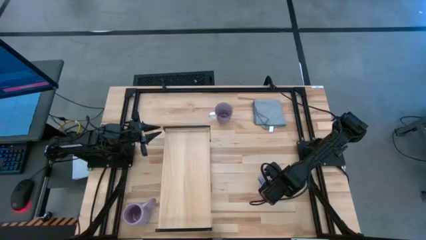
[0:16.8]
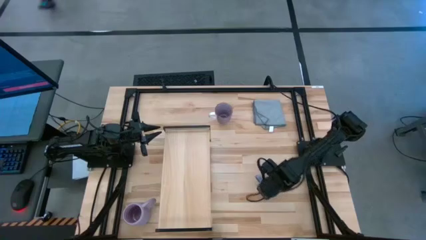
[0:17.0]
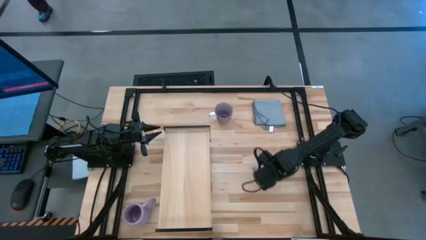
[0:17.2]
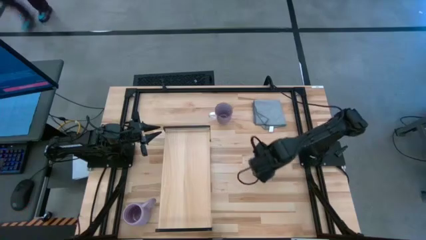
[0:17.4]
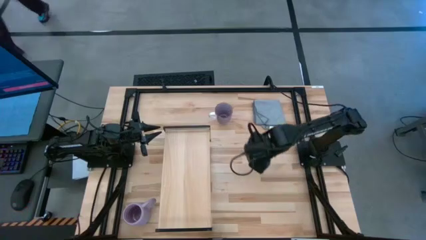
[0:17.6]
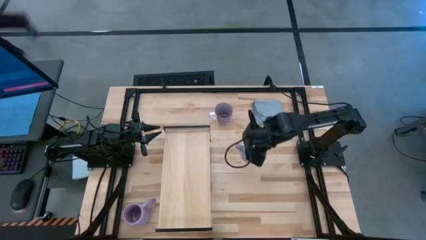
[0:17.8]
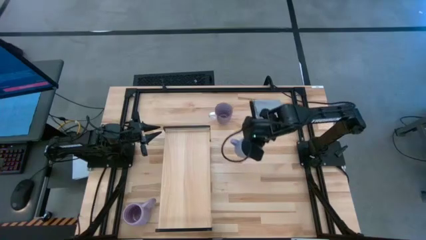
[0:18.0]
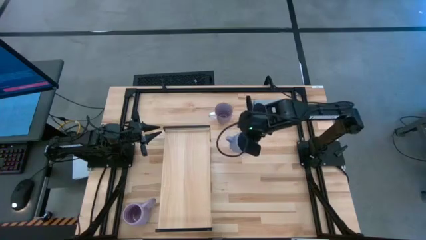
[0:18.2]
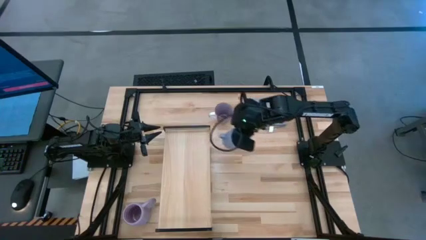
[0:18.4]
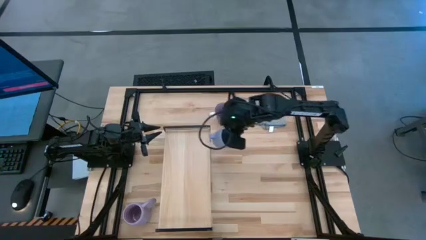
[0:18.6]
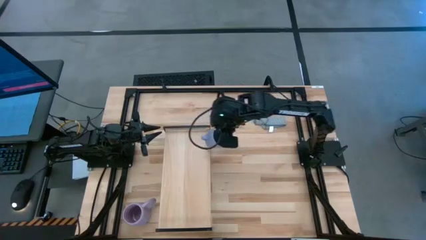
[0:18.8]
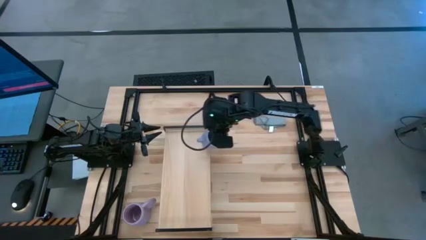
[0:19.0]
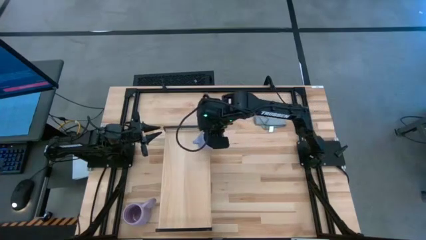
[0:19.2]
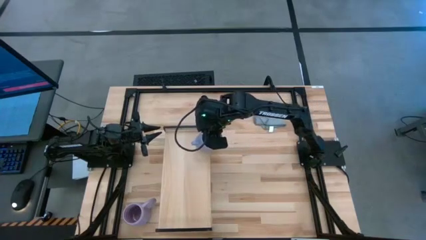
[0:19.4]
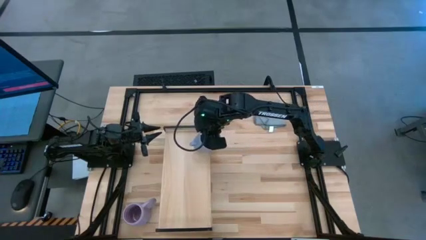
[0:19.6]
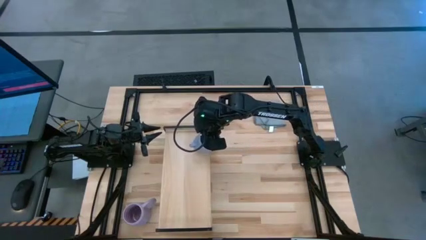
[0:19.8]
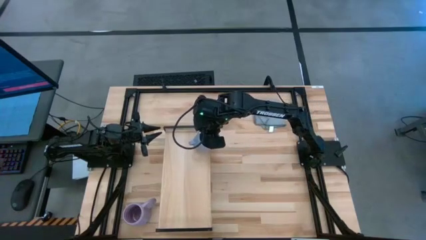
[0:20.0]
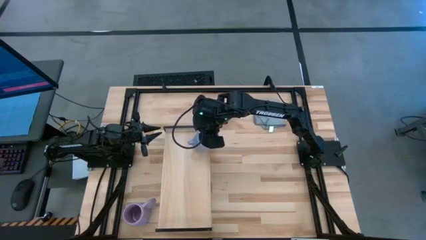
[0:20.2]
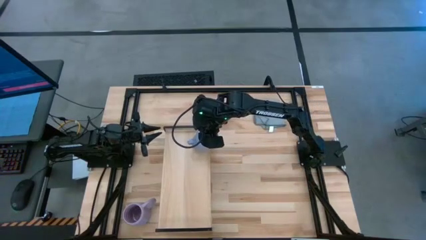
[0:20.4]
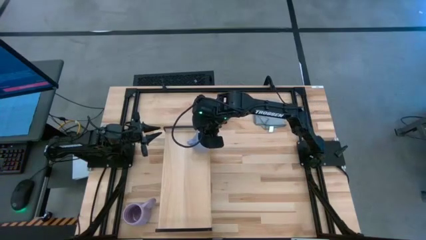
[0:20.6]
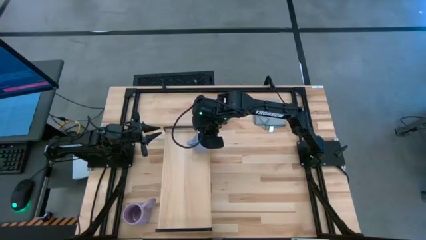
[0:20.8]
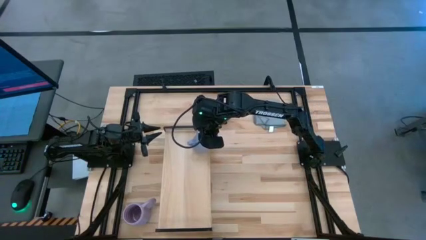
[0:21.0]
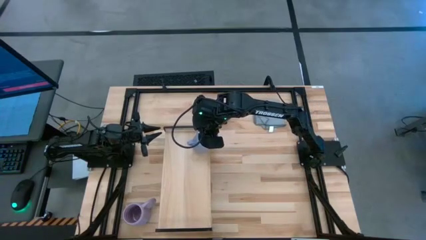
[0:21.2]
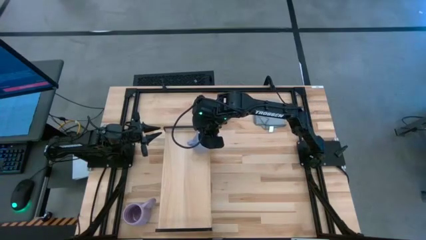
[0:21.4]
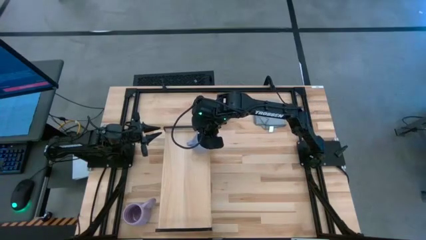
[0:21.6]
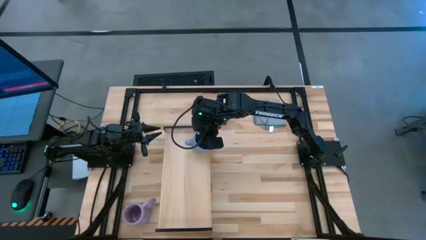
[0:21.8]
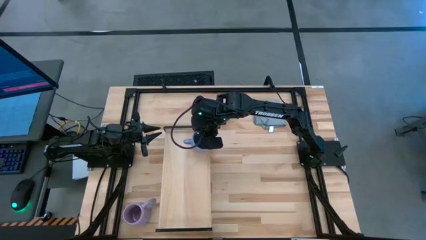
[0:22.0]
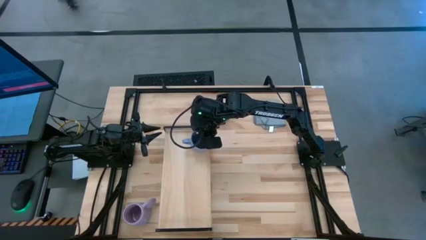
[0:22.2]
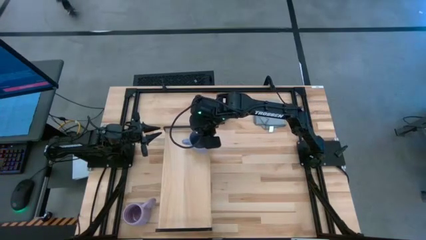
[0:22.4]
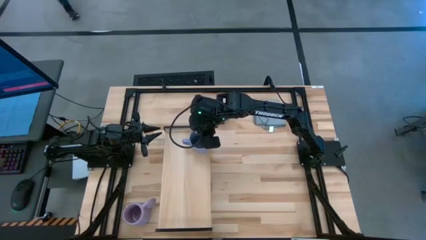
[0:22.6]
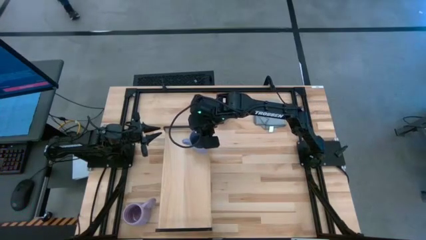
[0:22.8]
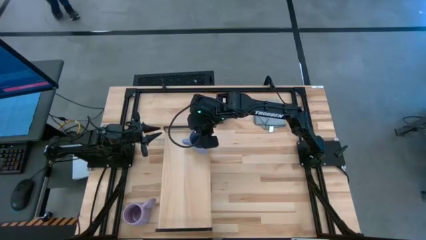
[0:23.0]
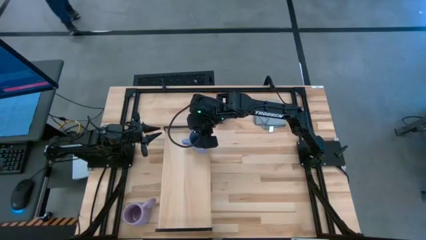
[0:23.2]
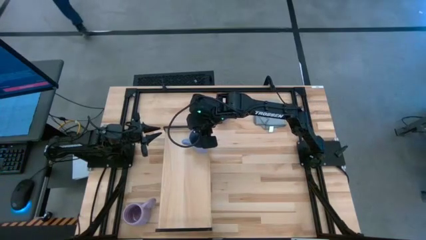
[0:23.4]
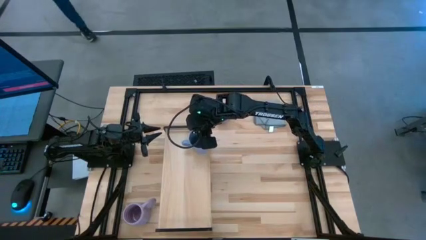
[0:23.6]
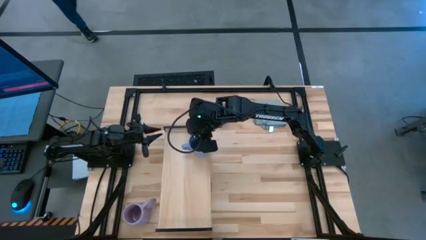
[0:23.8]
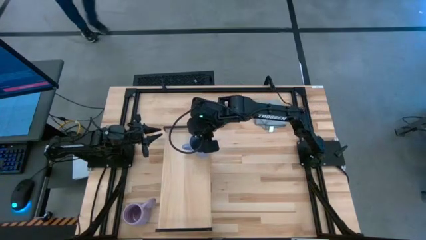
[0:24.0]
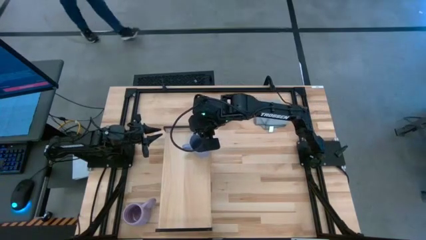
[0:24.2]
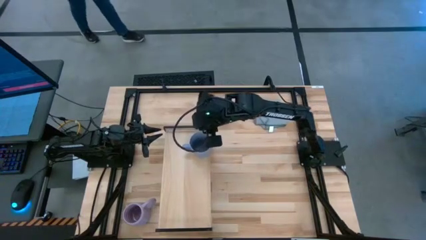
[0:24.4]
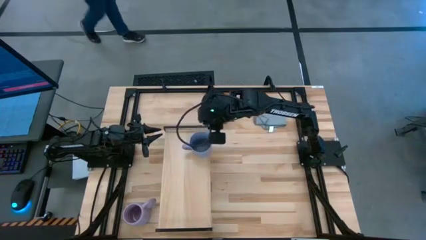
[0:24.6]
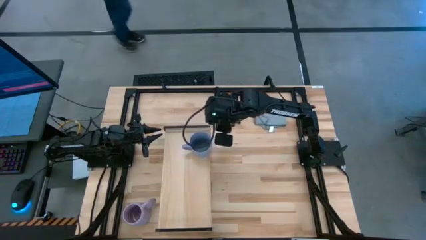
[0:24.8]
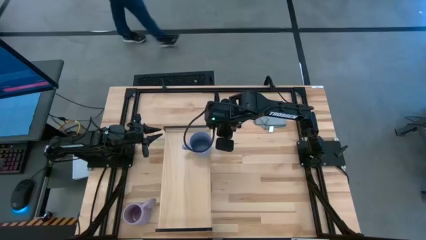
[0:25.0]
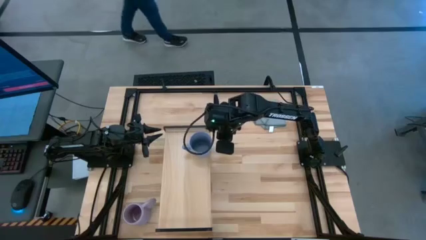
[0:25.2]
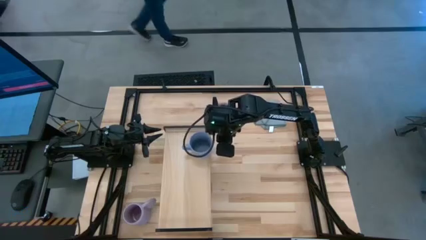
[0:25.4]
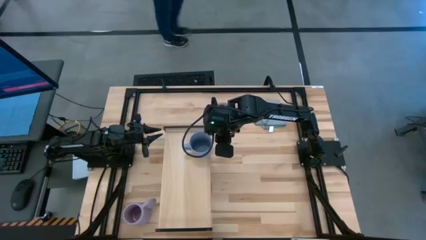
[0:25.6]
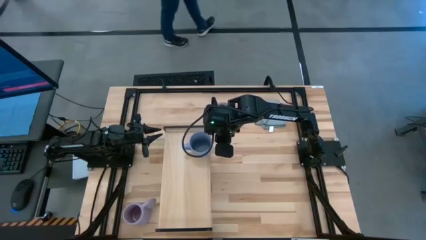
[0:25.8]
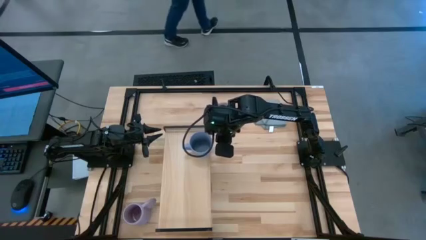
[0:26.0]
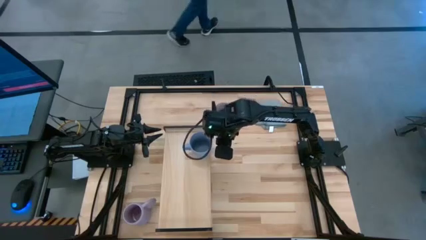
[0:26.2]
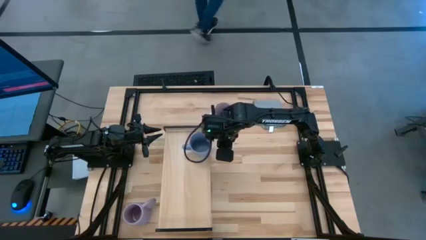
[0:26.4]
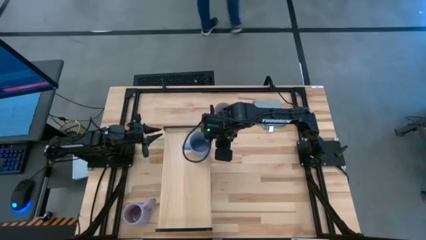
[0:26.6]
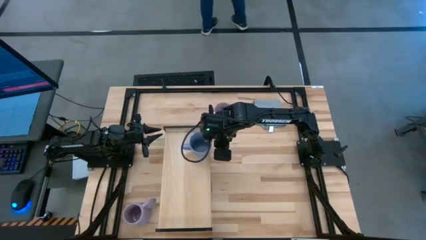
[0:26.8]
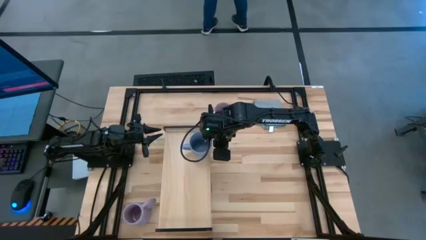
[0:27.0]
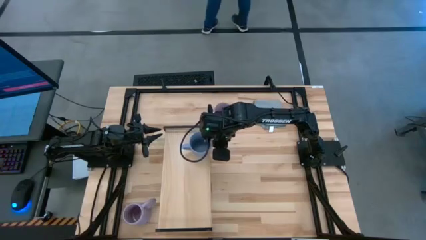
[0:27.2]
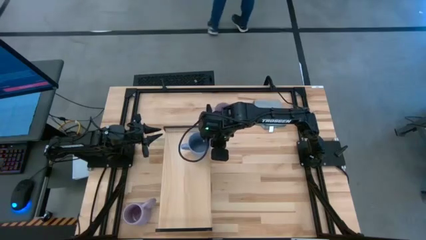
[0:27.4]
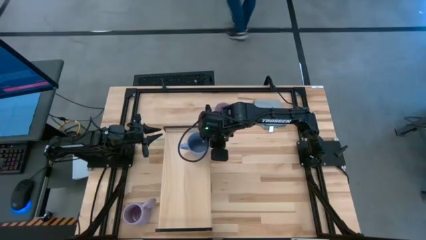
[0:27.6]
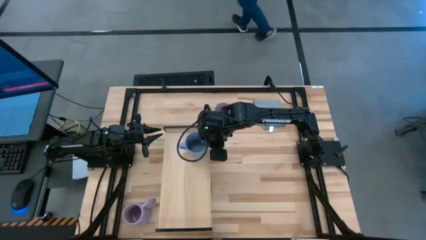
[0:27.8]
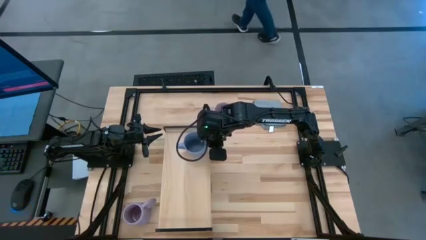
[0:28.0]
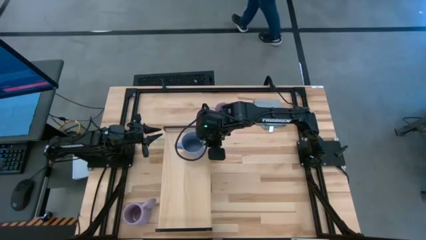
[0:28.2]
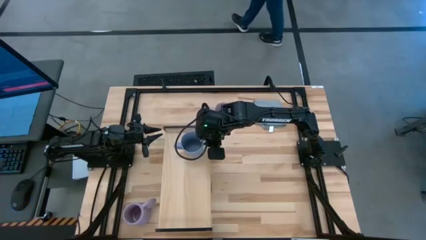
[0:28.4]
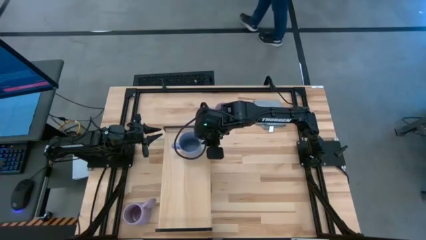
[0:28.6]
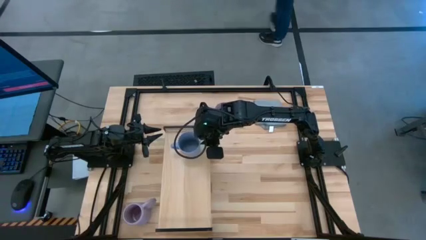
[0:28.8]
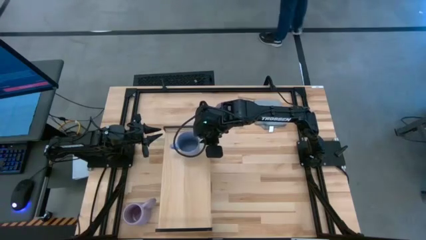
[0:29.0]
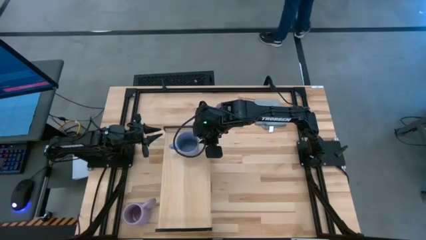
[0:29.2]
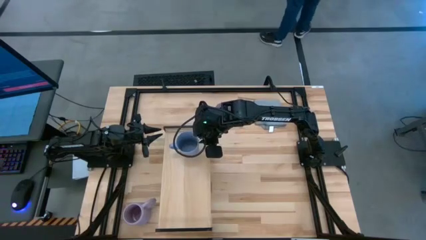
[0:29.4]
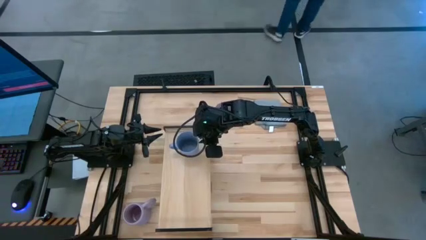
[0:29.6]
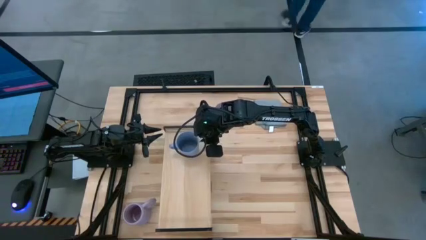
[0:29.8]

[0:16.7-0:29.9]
Task: Stack small to large cups/mugs on shelf
Put the blue mug on the shelf
